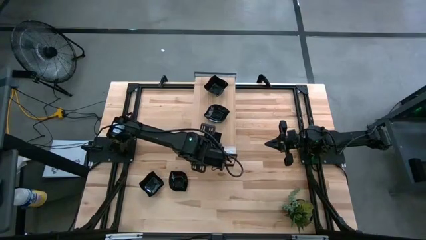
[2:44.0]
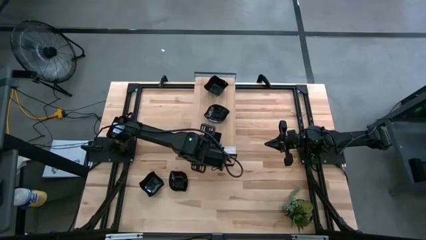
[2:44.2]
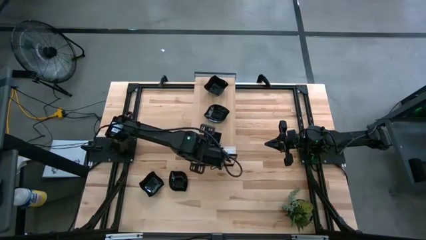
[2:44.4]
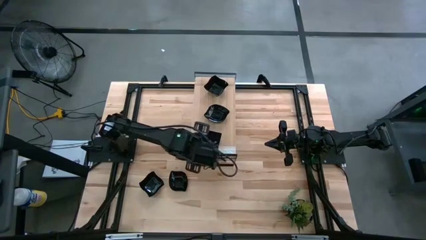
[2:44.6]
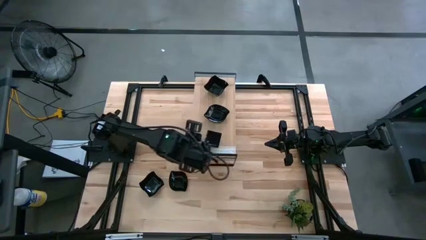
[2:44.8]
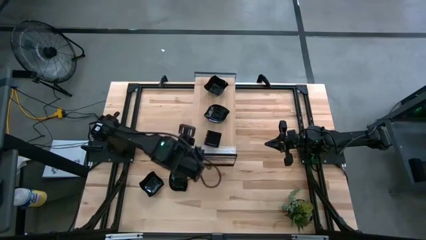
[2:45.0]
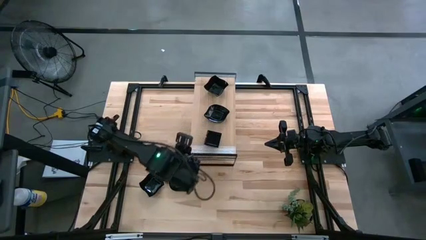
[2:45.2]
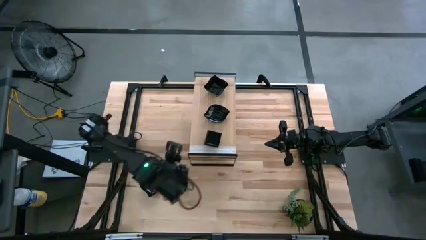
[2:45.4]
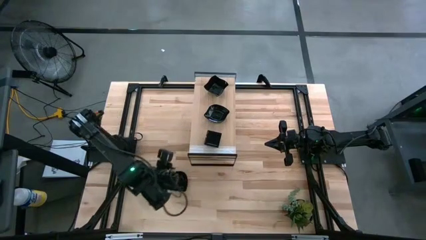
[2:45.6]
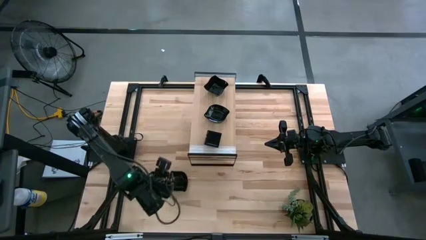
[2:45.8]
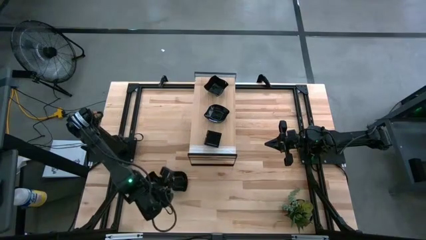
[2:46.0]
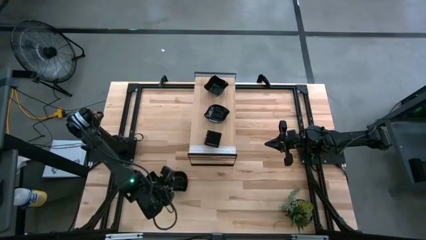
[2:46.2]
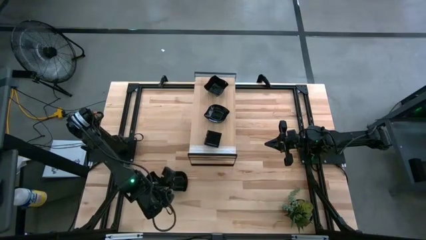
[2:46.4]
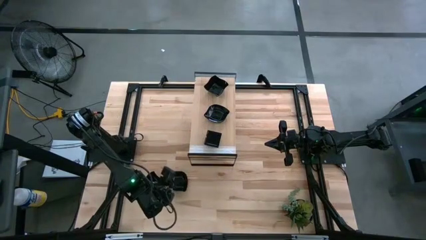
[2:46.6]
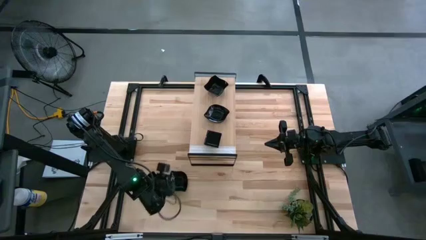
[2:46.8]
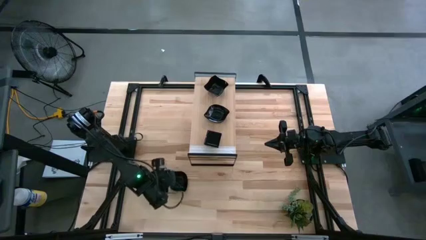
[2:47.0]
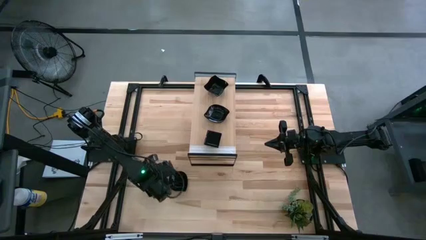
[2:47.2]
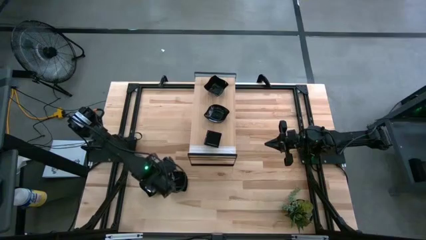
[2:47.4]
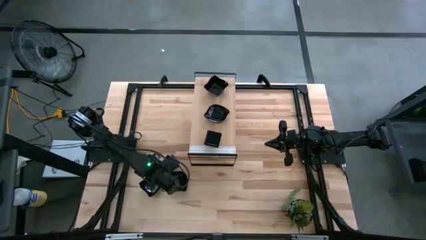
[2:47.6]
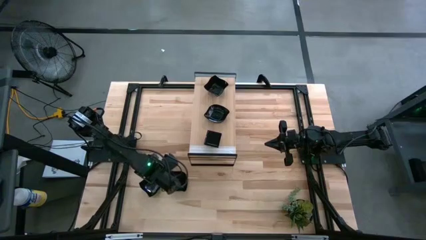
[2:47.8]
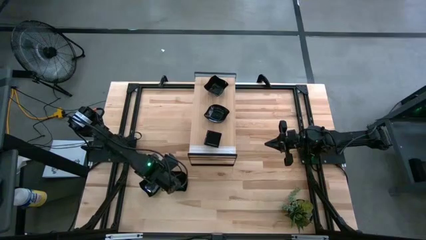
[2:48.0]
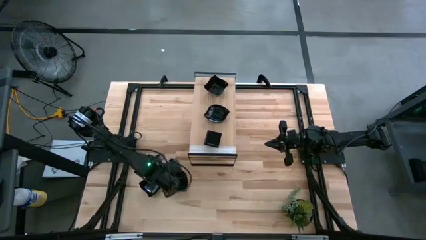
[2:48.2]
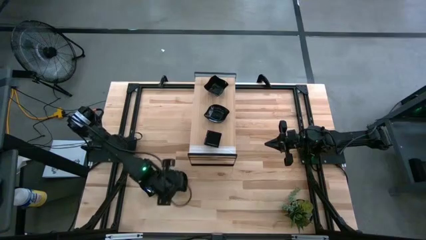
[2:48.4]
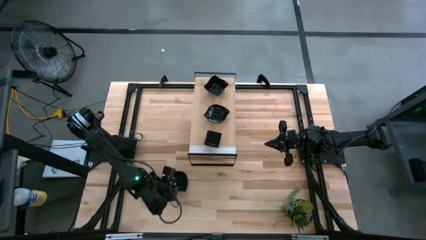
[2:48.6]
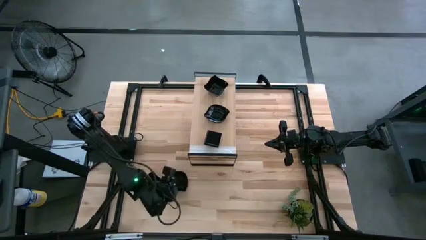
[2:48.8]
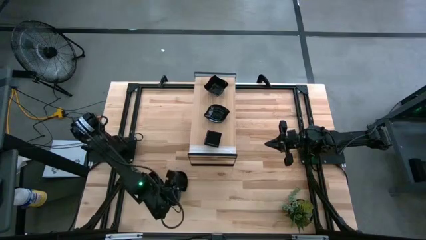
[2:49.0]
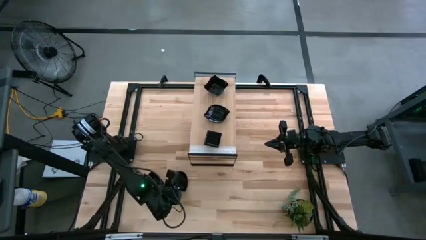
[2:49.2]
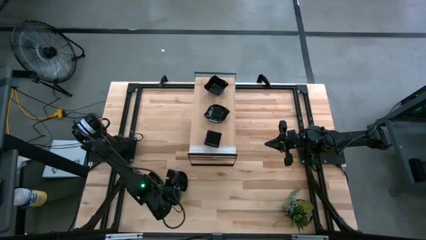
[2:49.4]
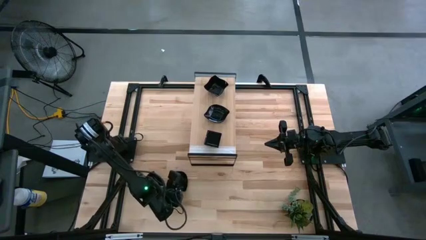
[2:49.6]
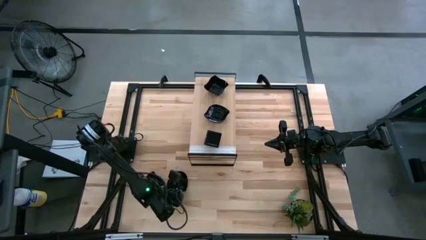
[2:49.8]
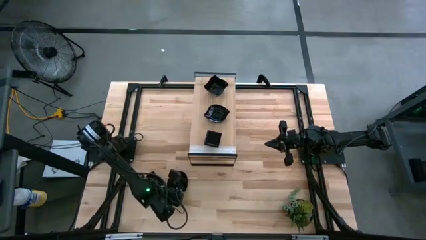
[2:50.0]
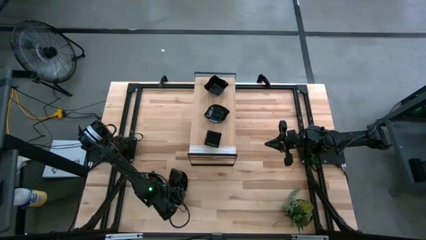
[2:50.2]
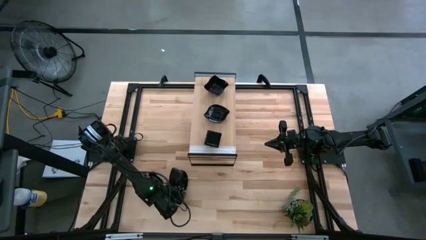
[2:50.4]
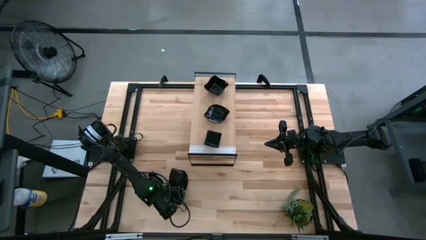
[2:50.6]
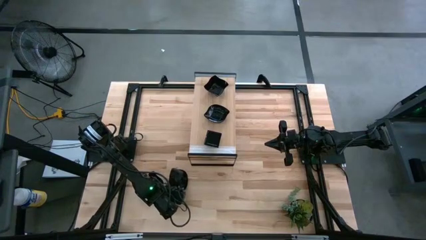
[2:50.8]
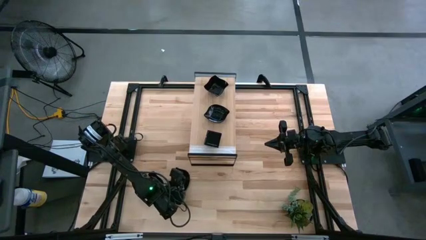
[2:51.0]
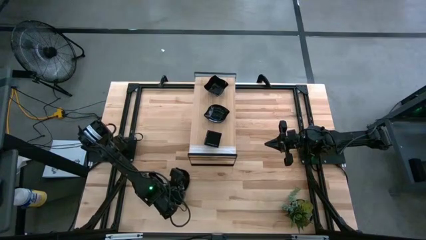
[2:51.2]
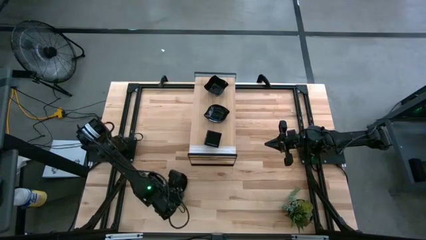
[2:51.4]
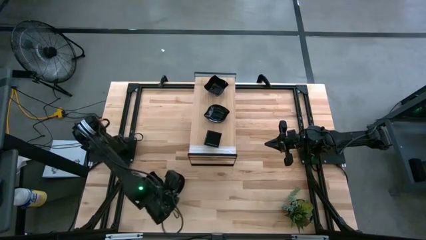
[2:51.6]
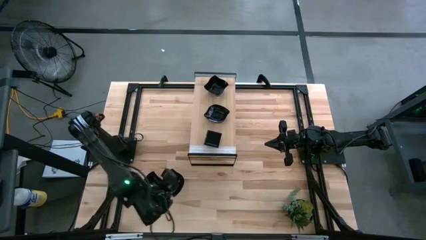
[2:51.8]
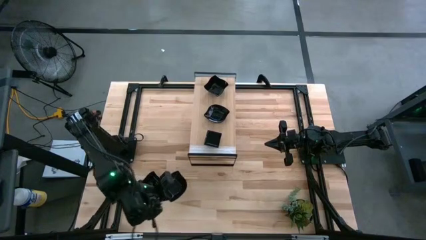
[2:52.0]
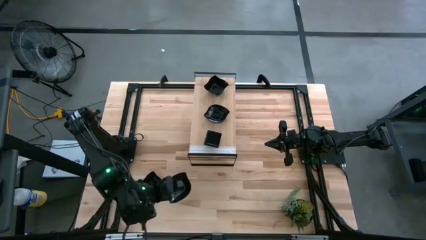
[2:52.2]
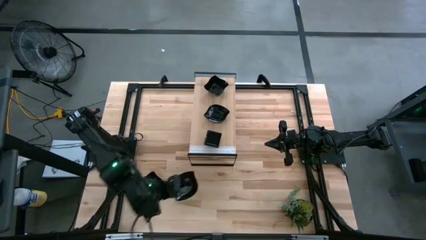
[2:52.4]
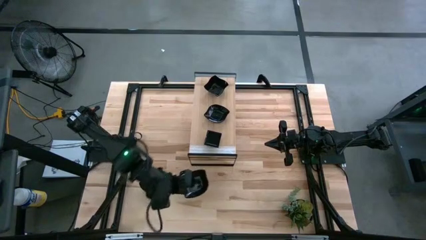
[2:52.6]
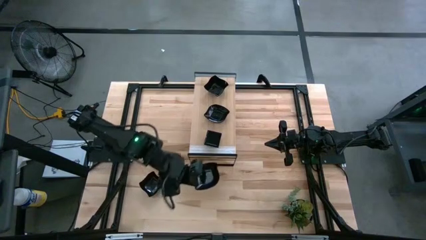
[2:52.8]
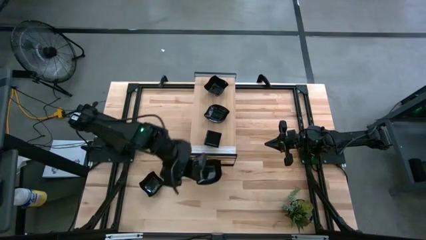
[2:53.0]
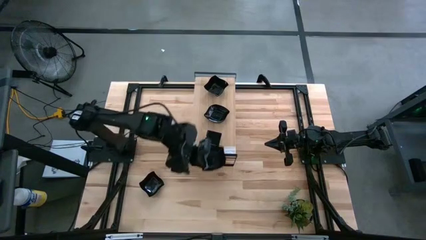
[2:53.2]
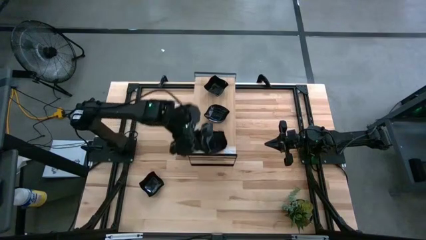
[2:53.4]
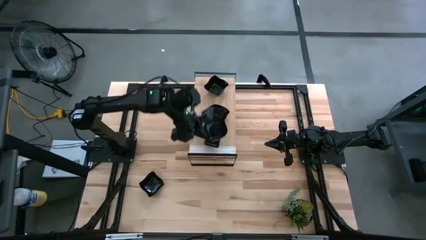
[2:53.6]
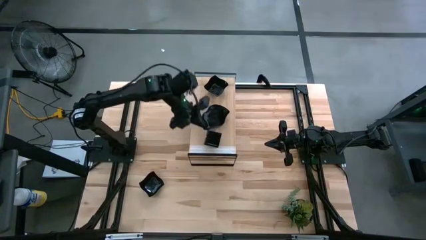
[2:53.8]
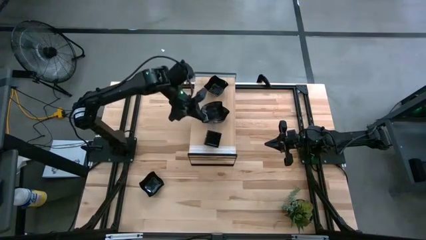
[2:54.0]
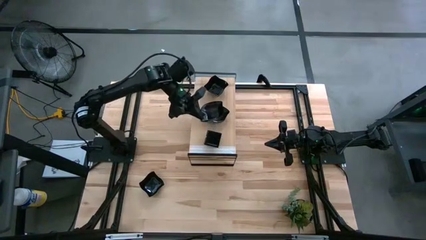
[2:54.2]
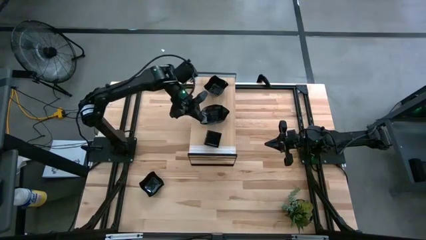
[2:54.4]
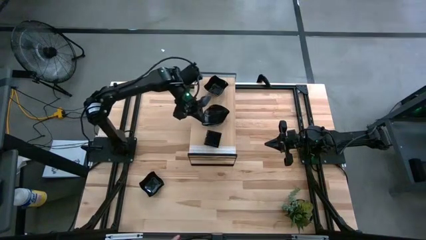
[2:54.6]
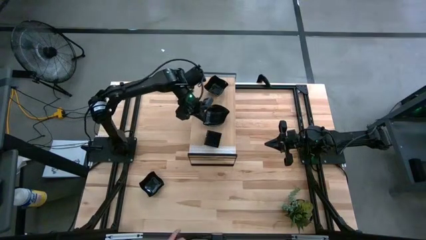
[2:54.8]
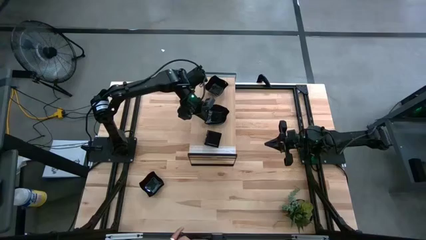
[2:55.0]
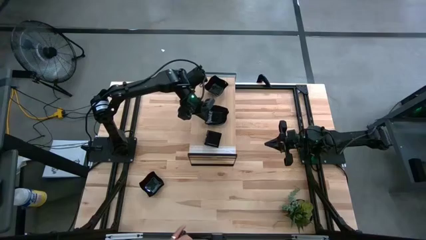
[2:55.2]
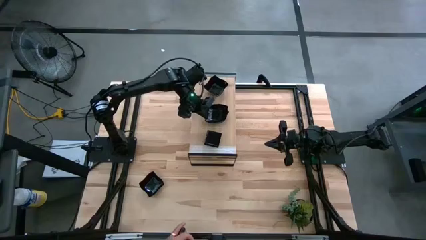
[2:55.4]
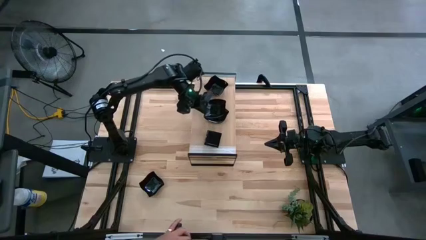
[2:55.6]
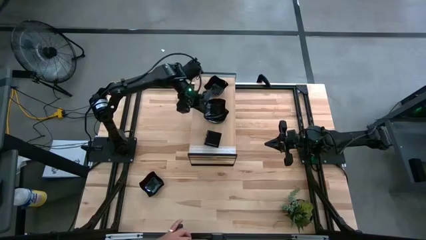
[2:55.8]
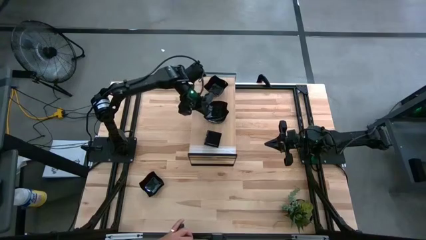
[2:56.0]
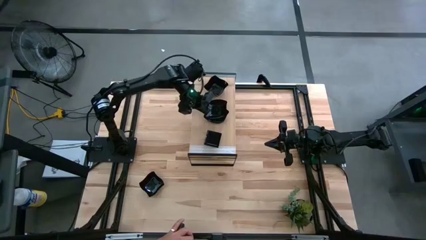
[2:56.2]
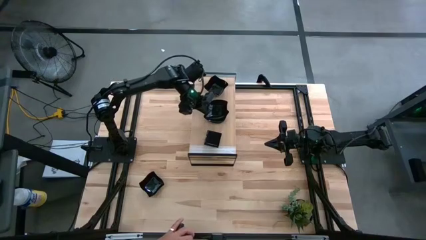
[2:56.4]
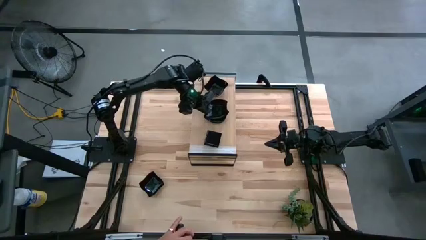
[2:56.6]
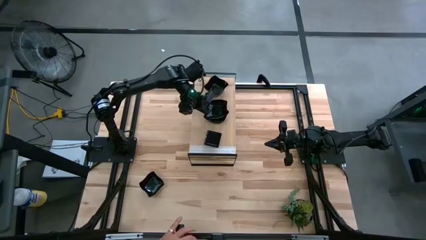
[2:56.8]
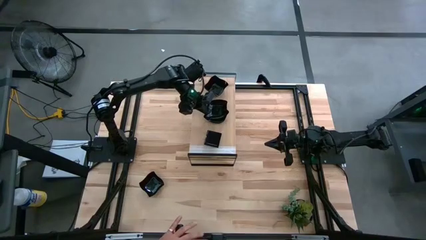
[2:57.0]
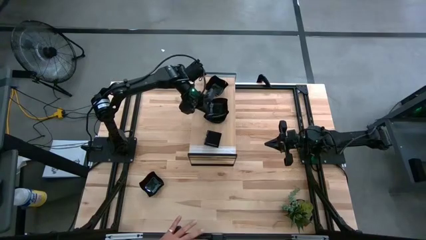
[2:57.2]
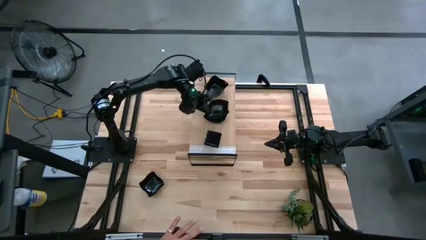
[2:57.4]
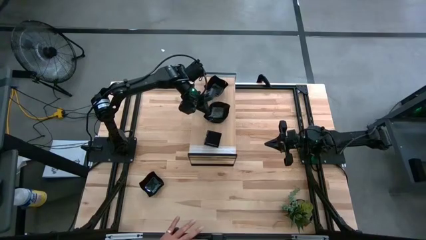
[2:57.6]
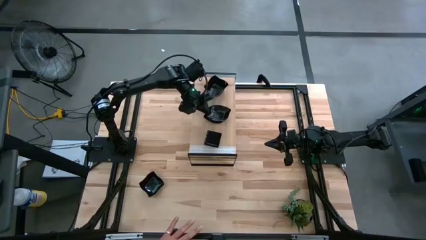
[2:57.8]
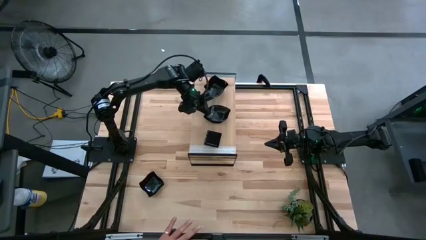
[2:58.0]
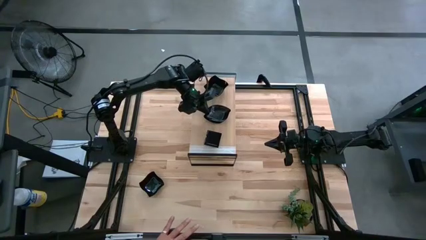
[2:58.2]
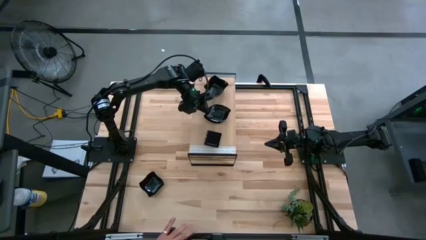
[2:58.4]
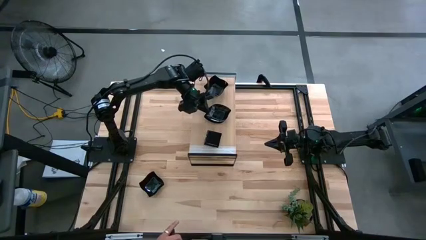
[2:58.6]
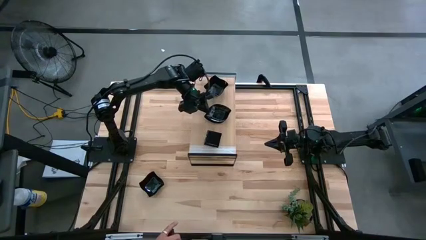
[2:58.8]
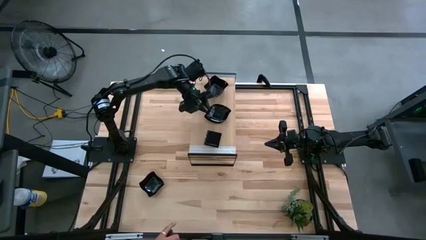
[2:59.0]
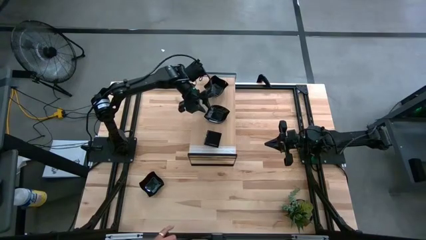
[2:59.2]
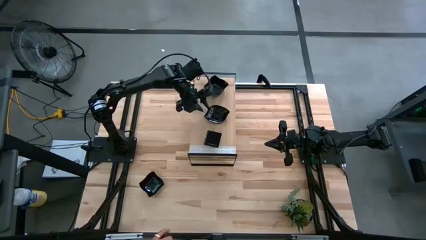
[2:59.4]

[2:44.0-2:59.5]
Task: Pick & Place Mini shaped plates
Stack the leaf-shaped plate on top of the stacked leaf-shaped plates on the shelf

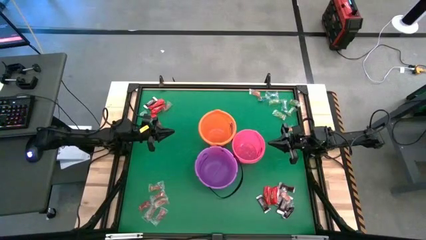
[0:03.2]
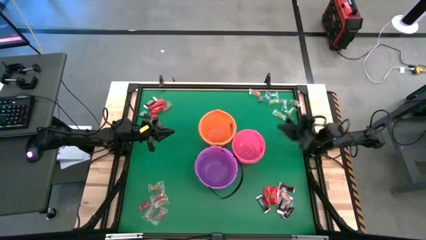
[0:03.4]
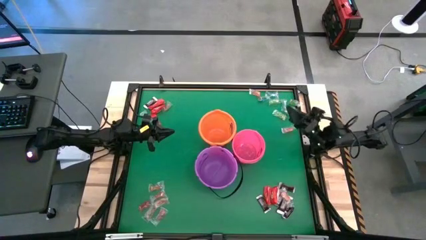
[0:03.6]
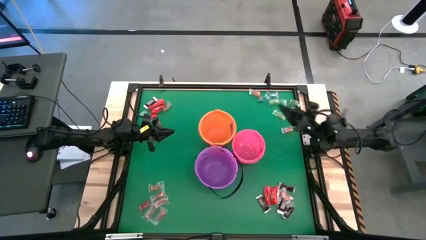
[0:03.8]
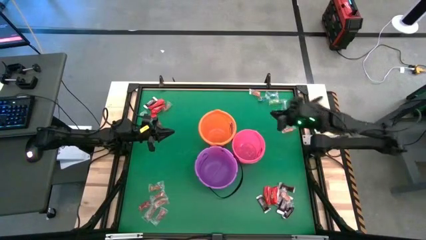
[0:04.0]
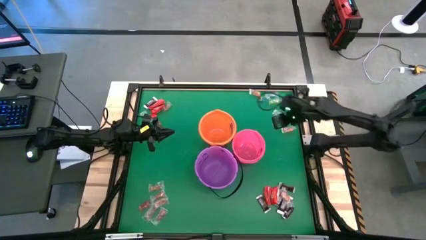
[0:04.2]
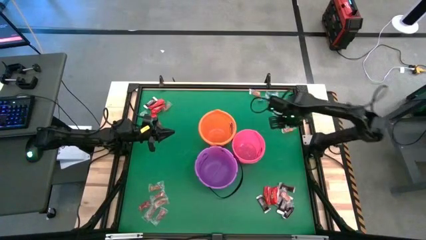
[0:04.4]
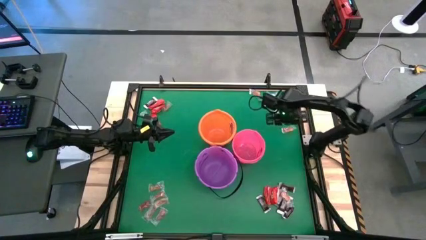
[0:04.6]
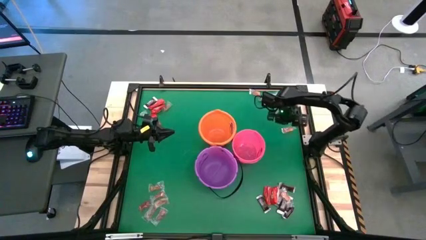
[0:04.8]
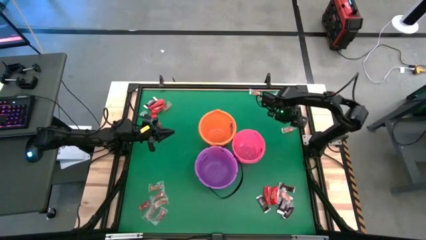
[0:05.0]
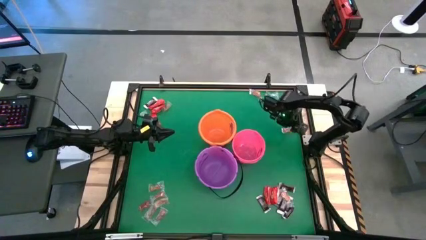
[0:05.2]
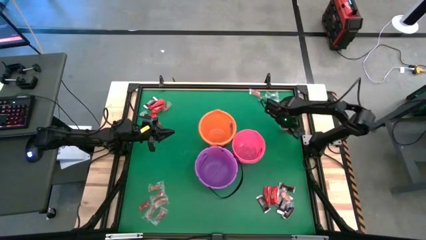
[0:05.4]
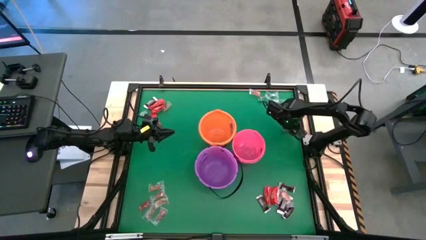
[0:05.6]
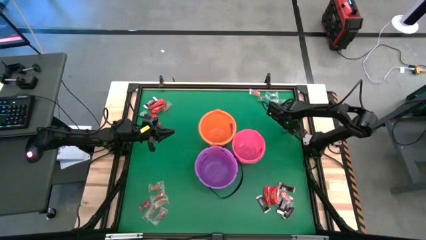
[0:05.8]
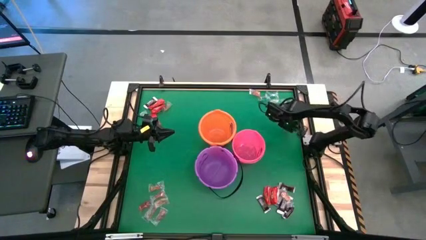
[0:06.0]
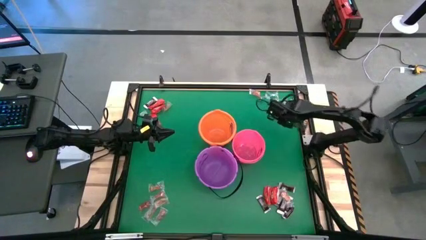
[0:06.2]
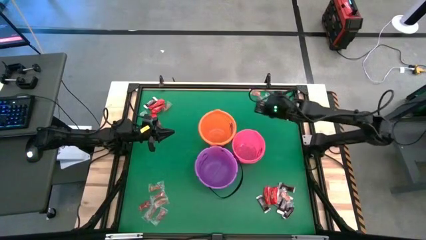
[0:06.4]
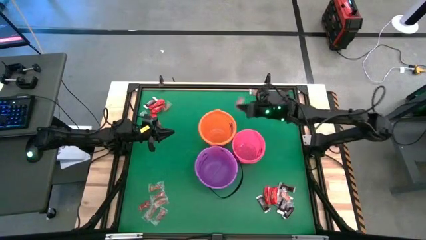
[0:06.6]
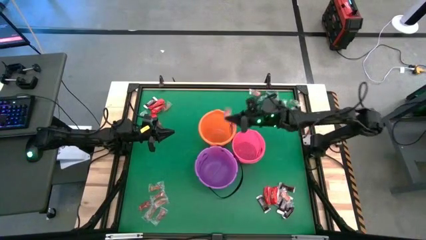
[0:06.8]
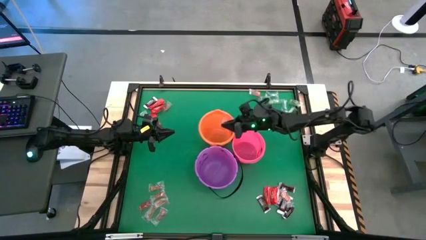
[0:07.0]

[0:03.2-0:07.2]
Task: Sort candy by brand, put in halloween buckets
Put the orange gummy into the orange bucket
